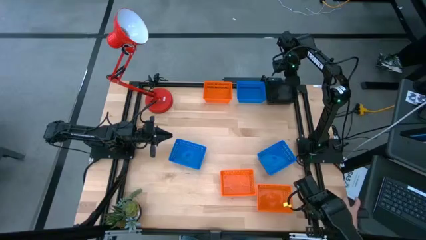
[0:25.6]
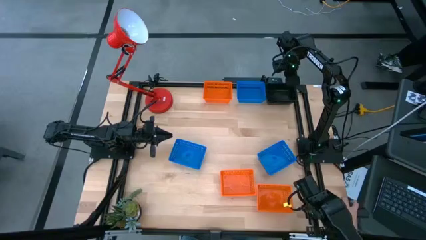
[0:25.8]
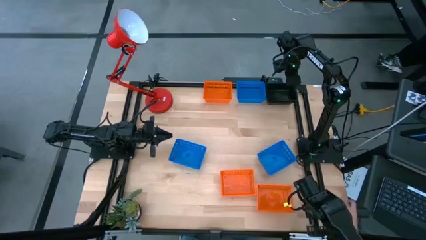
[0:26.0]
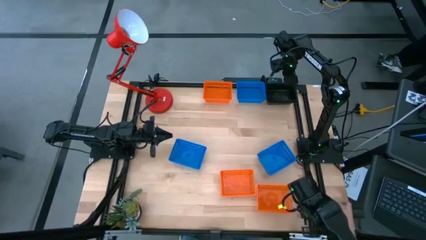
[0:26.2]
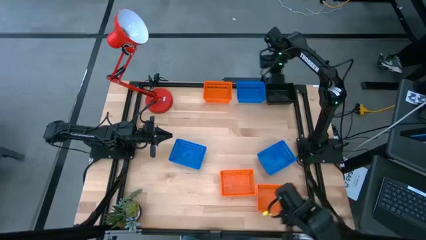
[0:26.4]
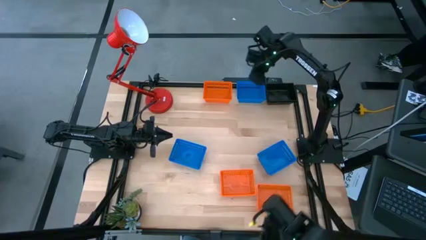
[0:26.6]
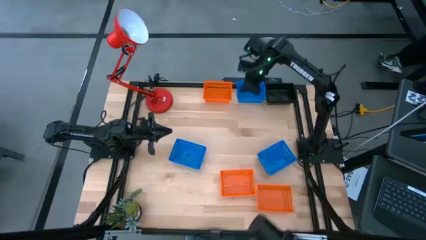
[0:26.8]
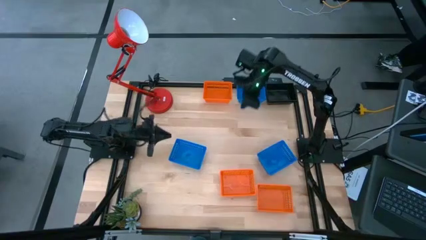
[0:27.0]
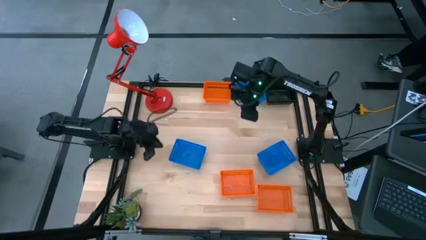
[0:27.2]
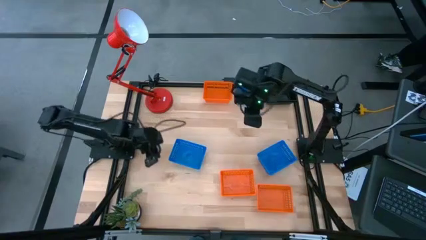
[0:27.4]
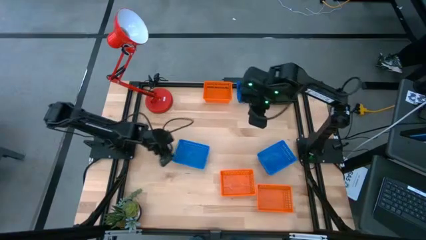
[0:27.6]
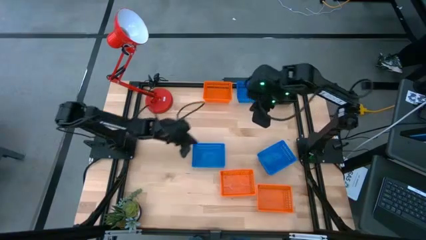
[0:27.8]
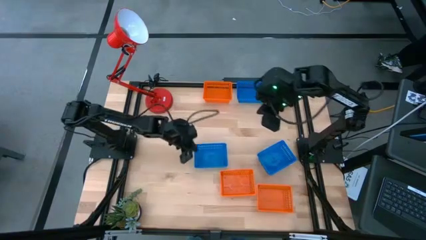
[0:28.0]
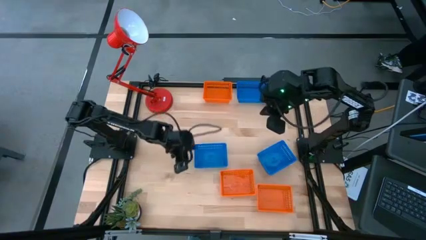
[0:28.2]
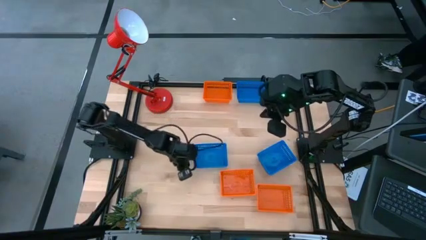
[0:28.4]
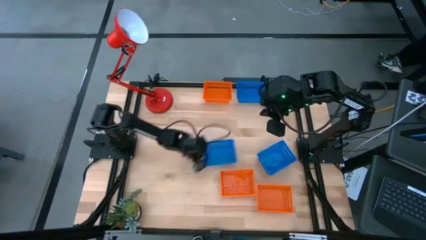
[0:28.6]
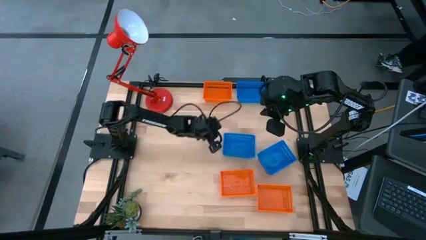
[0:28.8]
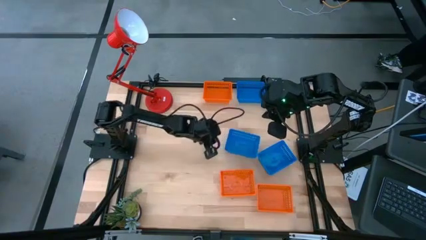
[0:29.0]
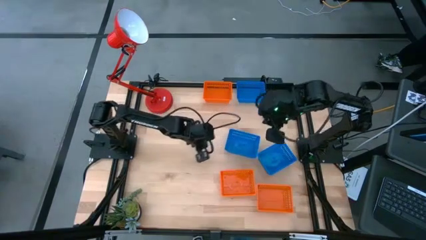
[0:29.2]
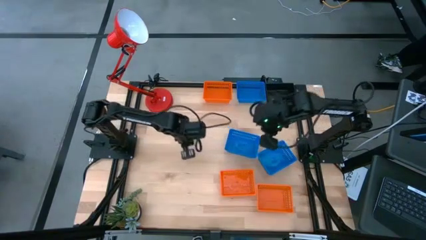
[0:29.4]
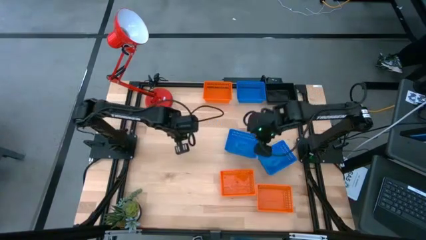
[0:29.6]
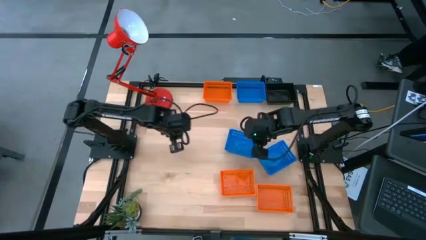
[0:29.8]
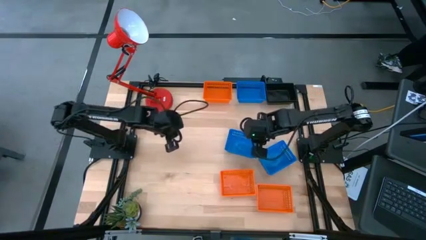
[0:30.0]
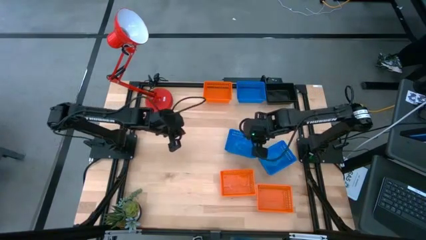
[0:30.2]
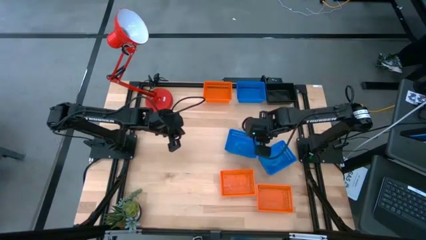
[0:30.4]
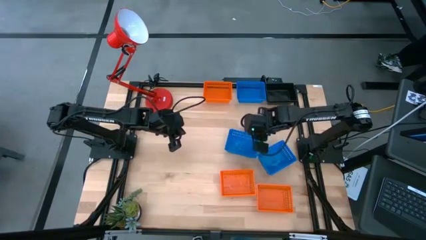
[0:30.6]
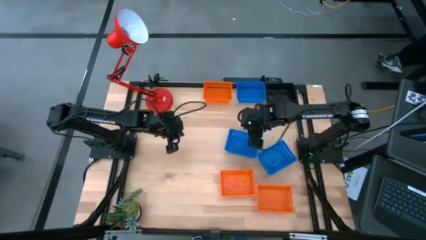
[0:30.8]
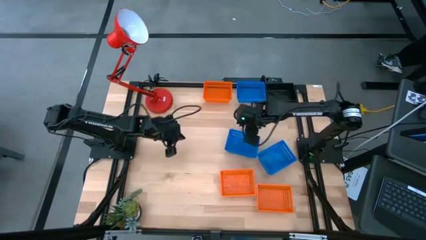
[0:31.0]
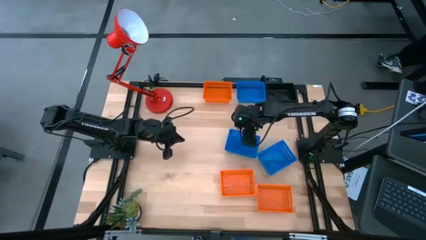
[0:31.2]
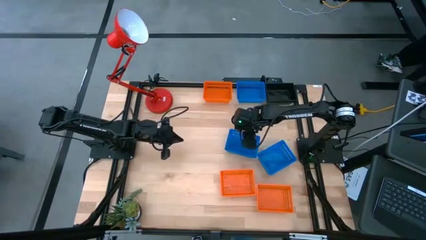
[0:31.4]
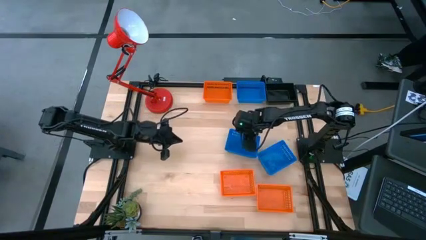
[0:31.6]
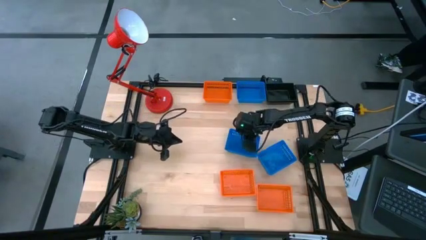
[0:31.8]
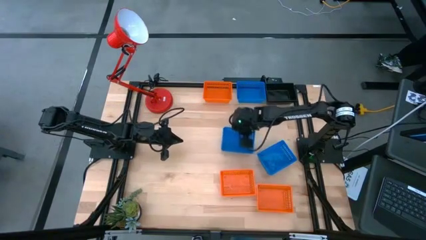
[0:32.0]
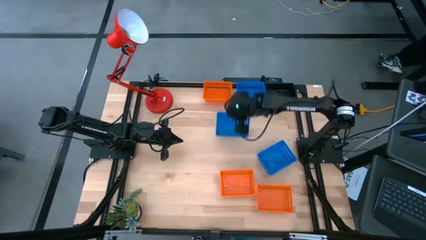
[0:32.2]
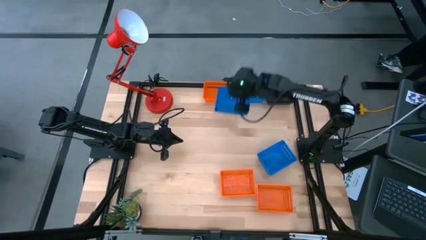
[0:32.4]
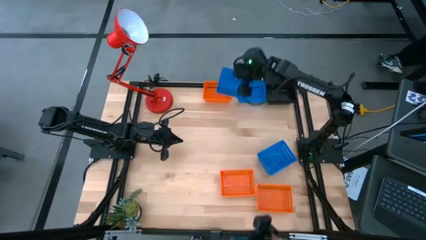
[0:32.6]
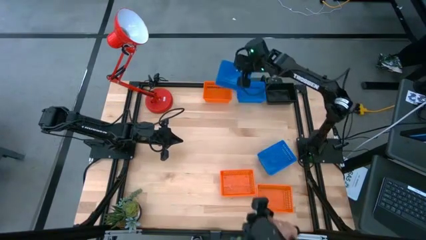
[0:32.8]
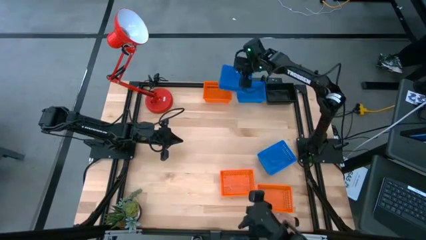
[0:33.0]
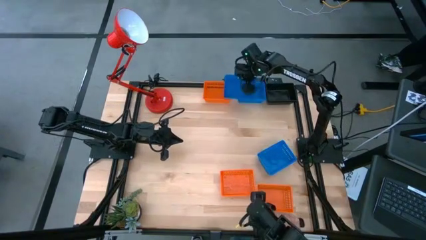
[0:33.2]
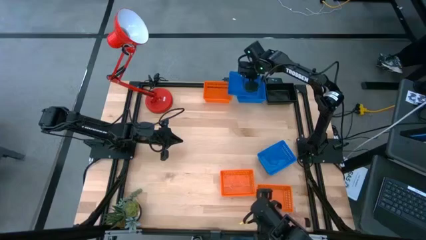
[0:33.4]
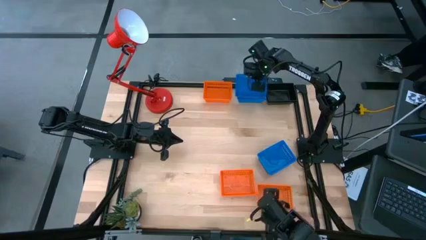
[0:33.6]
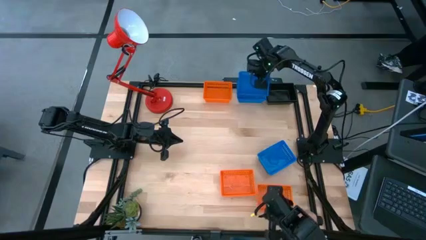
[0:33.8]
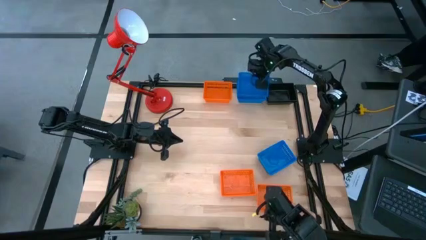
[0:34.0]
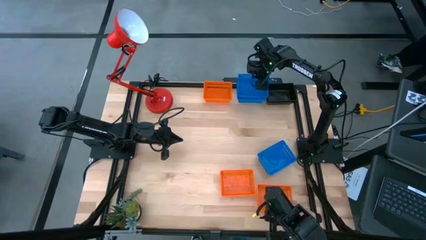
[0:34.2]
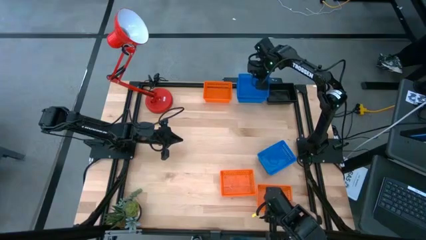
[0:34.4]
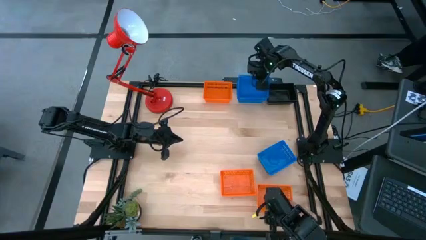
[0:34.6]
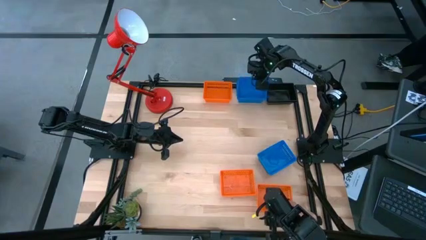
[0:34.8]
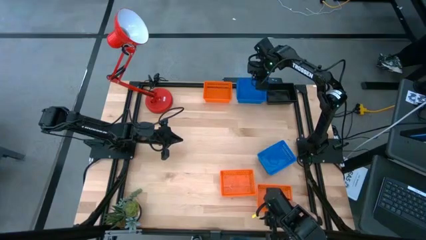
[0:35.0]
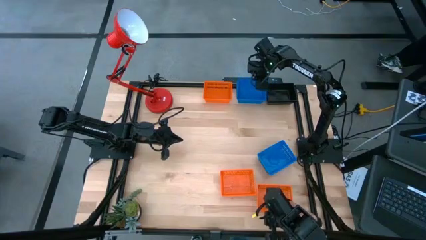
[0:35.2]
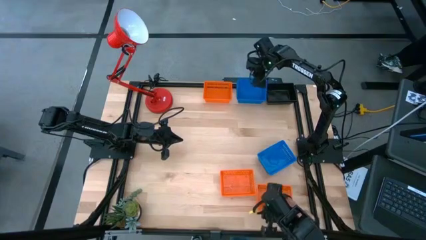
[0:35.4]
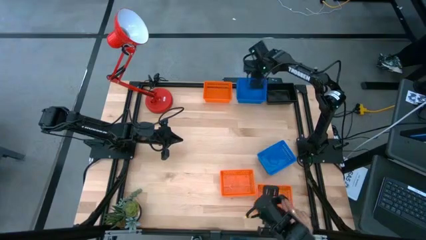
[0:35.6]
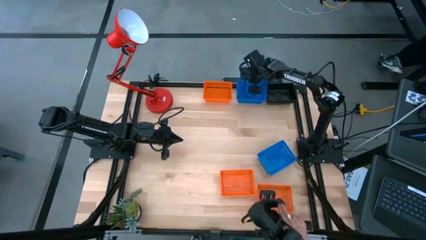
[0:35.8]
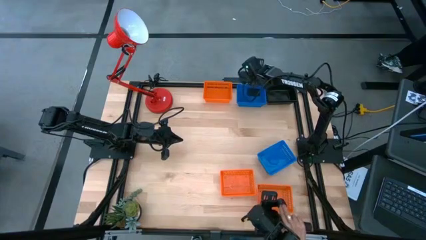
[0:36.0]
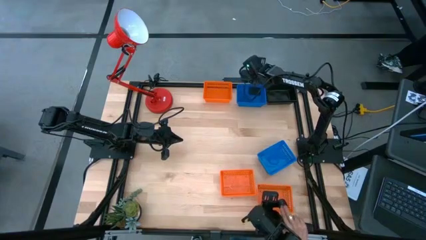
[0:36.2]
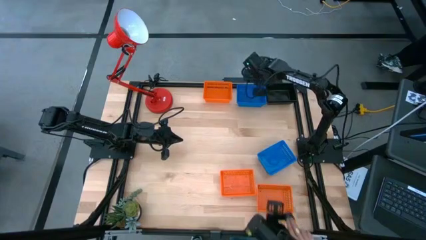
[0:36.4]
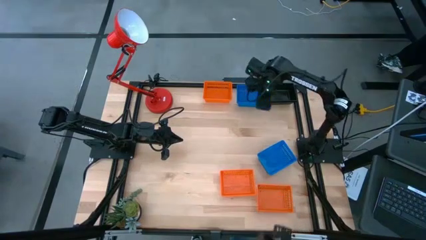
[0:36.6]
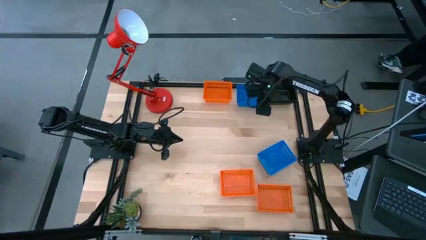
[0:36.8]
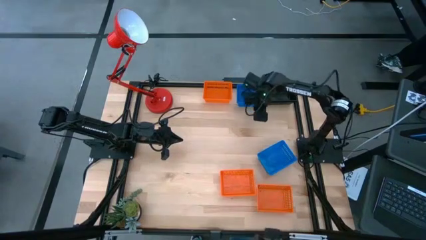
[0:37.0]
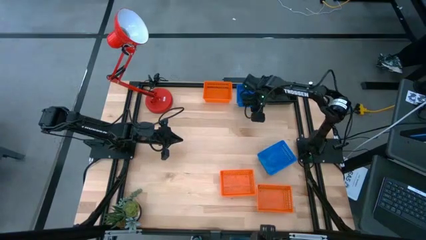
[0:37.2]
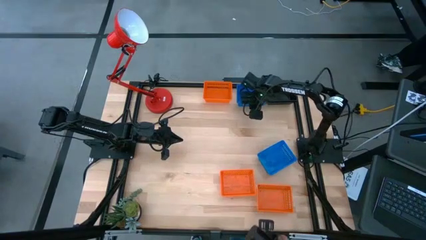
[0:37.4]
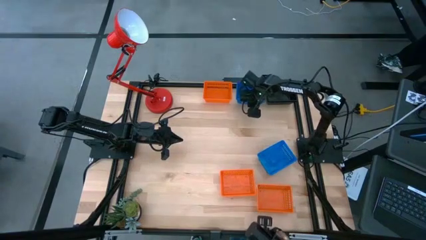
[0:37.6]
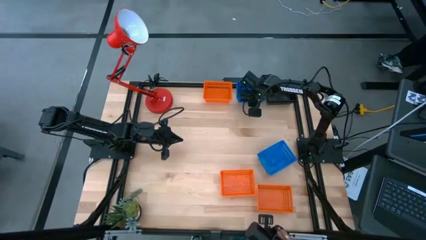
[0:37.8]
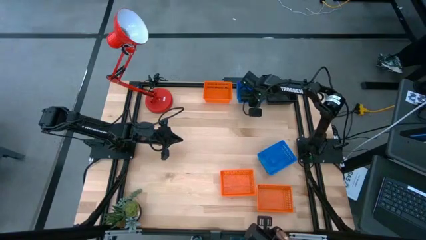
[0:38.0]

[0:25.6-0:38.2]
Stack the bottom left blue bin on the top blue bin

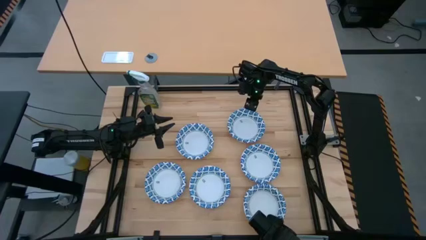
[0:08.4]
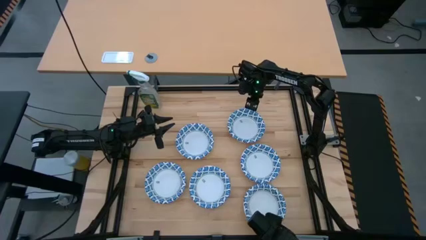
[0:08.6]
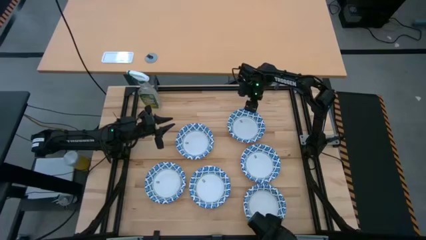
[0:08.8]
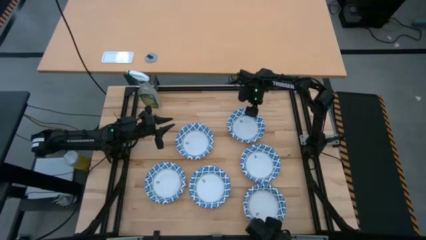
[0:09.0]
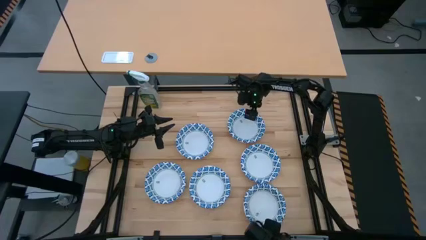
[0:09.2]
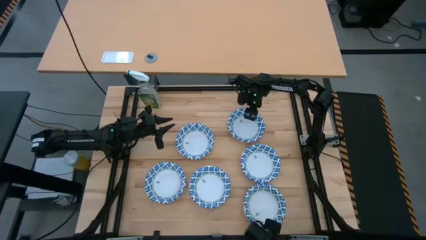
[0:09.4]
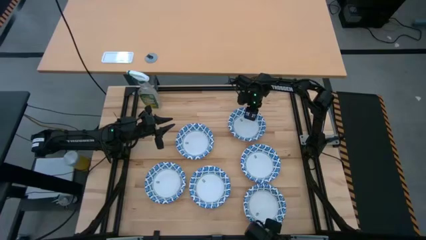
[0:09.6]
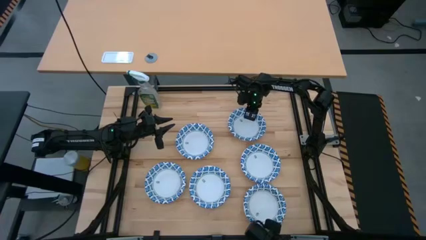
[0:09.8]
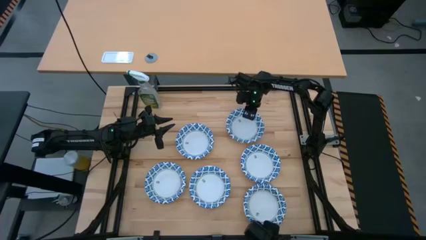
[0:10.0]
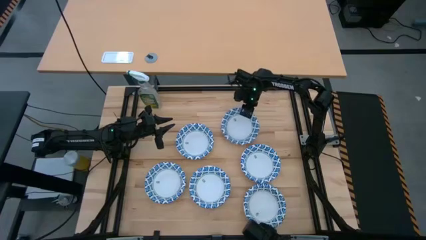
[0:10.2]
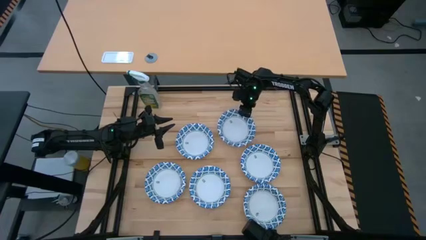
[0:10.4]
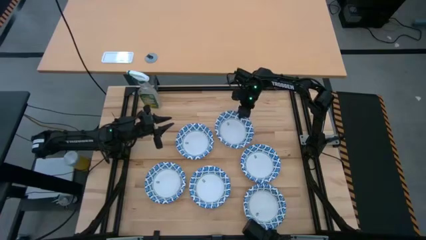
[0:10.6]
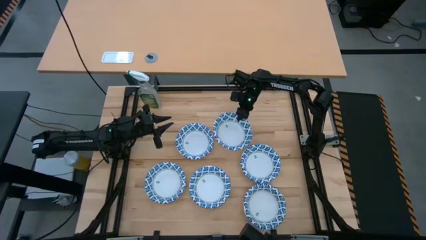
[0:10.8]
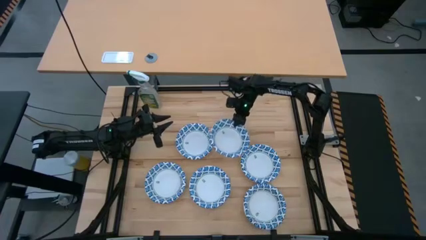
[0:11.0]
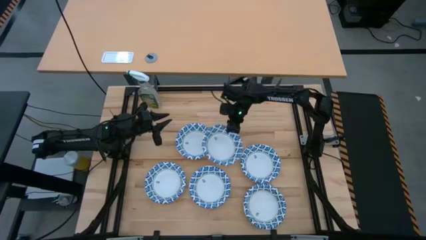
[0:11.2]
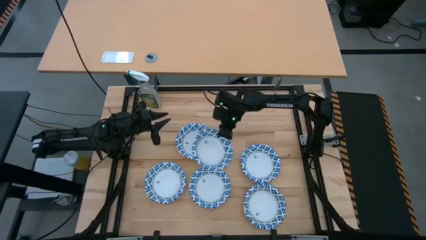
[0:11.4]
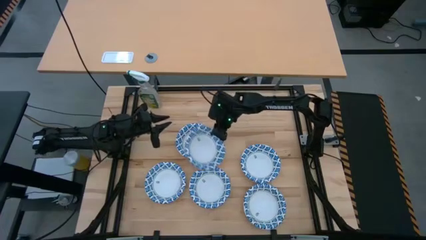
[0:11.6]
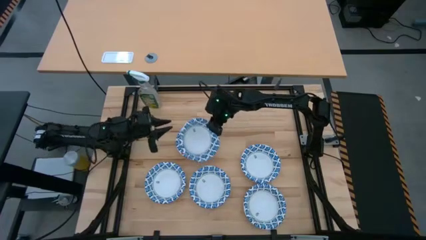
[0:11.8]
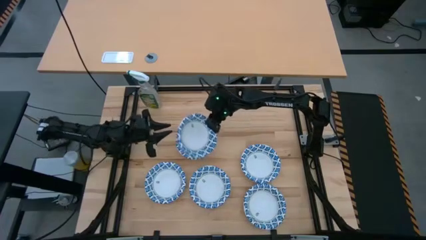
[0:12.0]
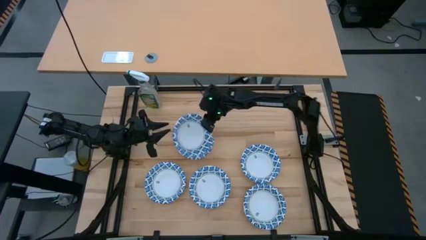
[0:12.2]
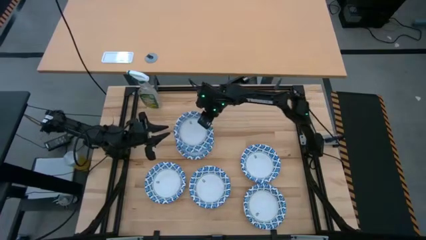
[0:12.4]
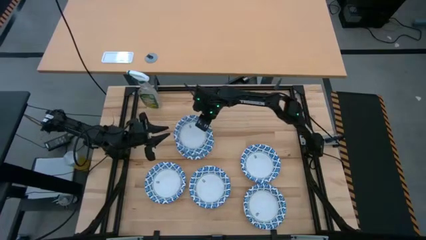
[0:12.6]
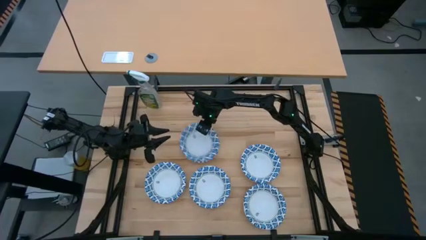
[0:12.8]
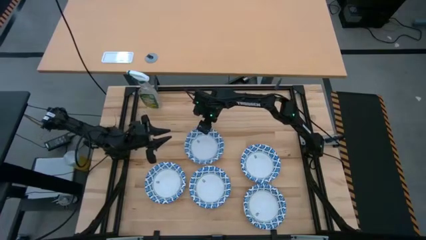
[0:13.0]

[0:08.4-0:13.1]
Put the white bowl on top of the white bowl
